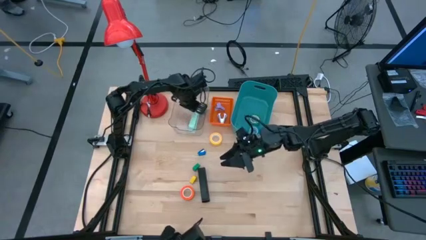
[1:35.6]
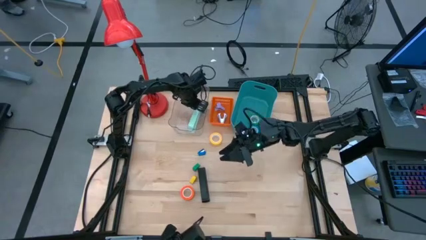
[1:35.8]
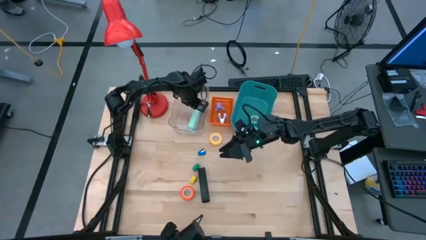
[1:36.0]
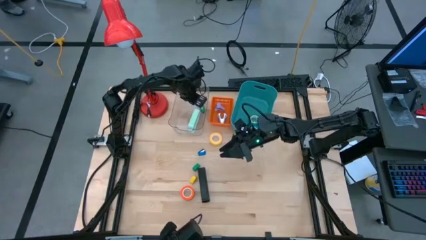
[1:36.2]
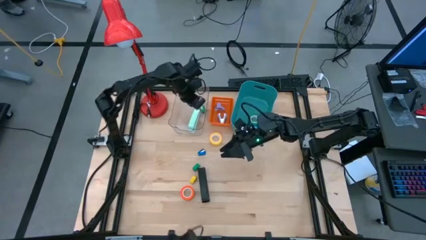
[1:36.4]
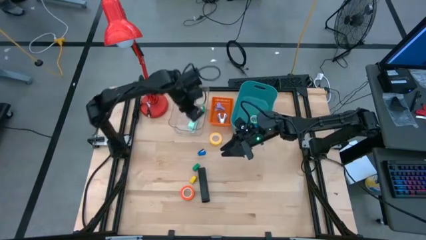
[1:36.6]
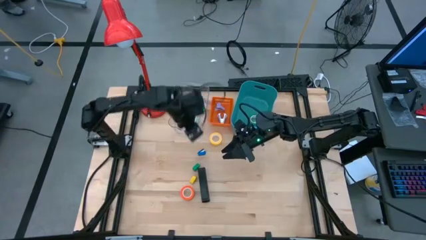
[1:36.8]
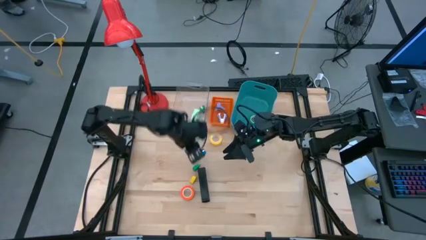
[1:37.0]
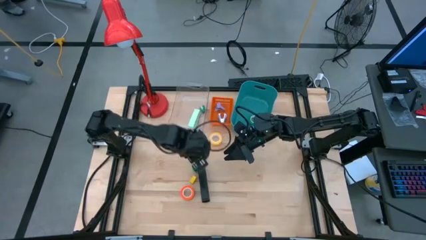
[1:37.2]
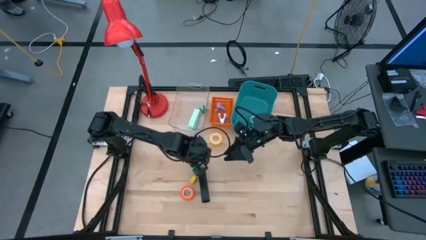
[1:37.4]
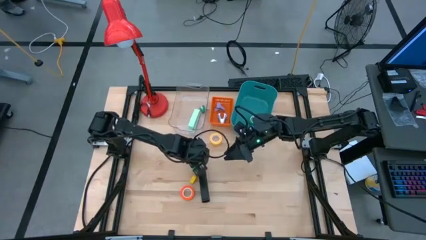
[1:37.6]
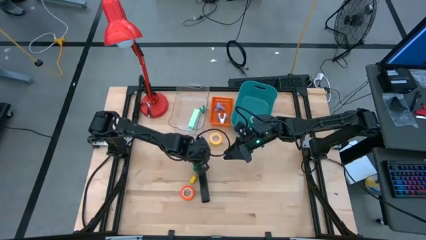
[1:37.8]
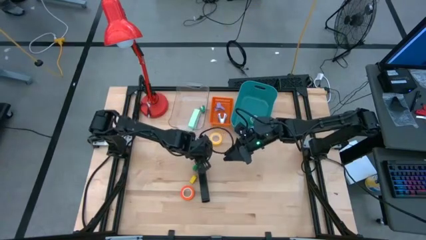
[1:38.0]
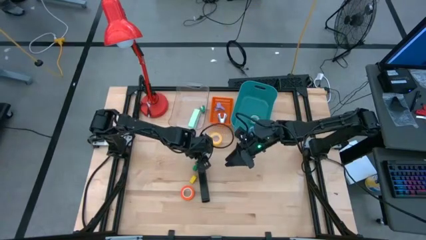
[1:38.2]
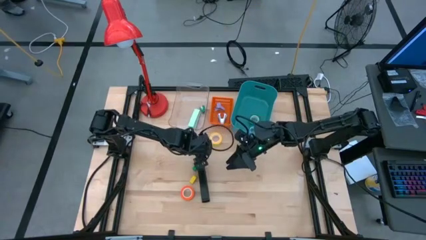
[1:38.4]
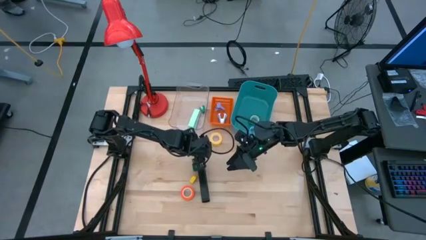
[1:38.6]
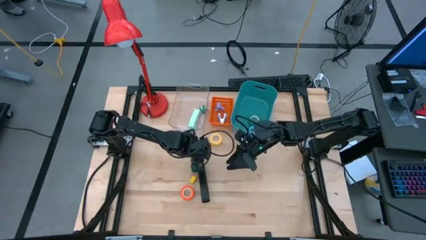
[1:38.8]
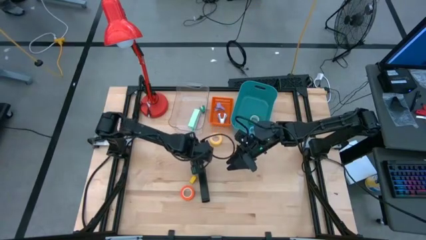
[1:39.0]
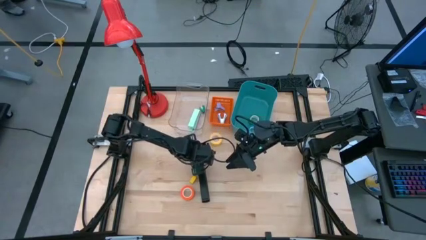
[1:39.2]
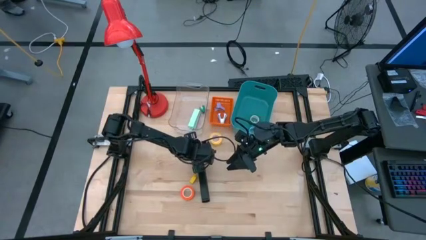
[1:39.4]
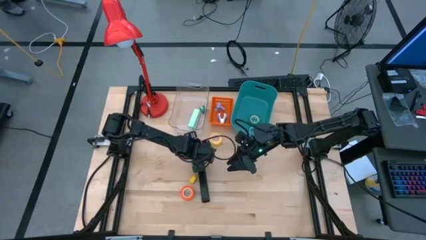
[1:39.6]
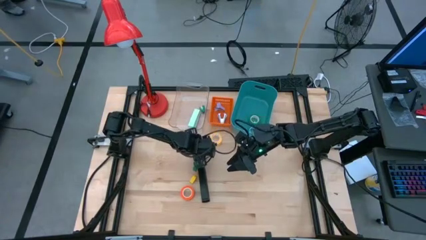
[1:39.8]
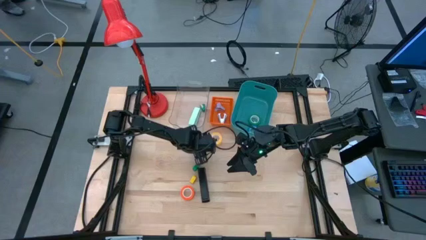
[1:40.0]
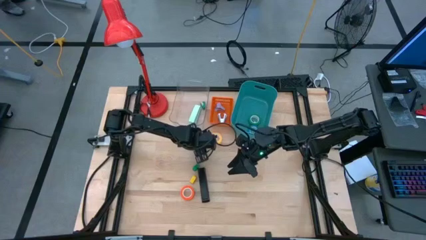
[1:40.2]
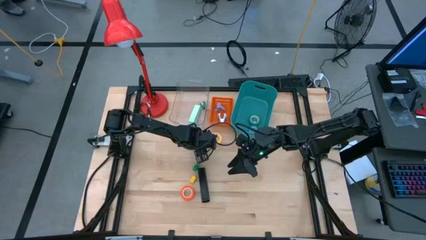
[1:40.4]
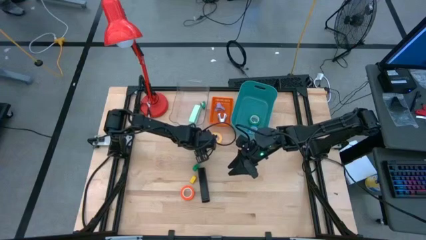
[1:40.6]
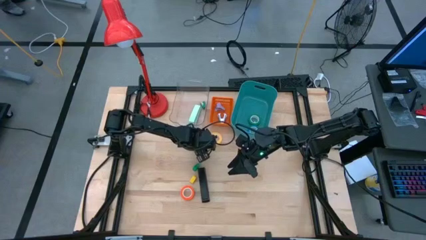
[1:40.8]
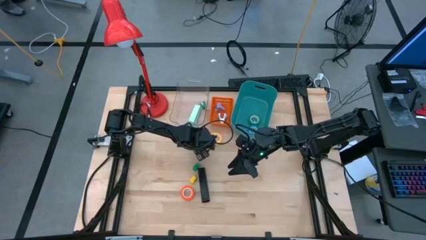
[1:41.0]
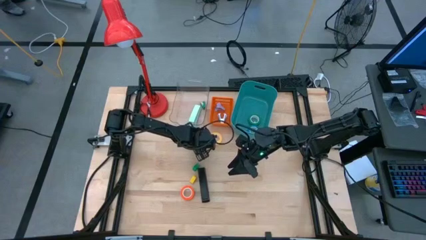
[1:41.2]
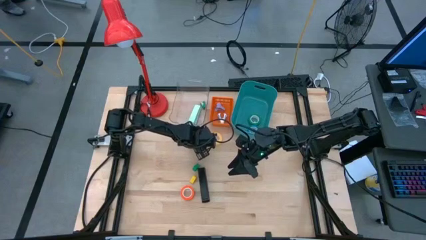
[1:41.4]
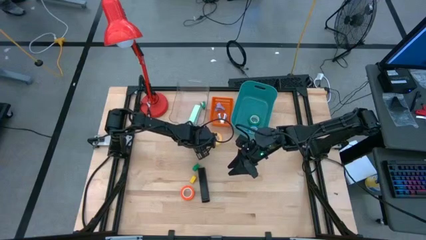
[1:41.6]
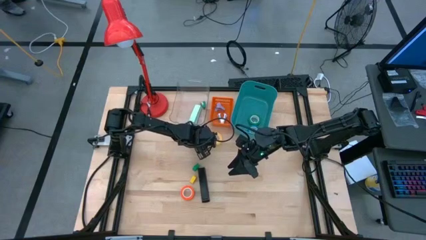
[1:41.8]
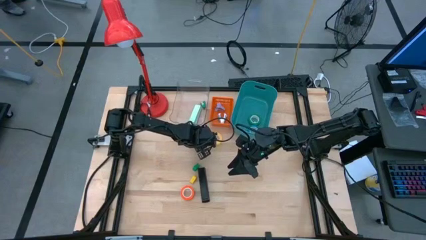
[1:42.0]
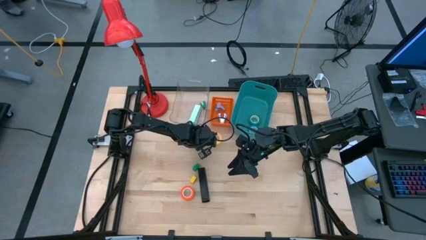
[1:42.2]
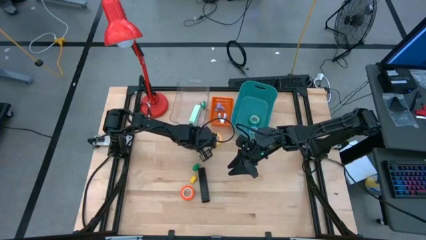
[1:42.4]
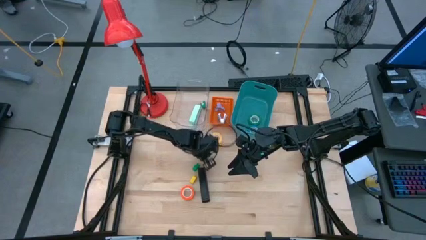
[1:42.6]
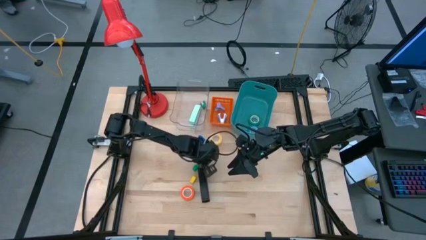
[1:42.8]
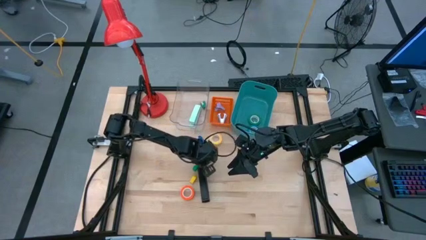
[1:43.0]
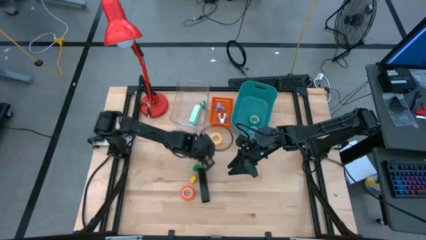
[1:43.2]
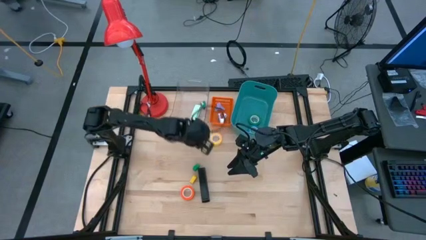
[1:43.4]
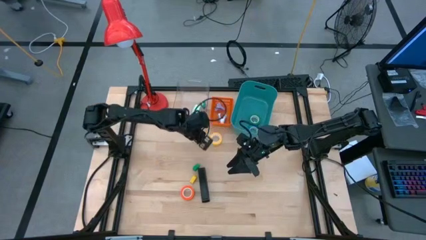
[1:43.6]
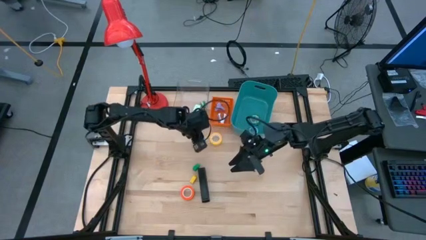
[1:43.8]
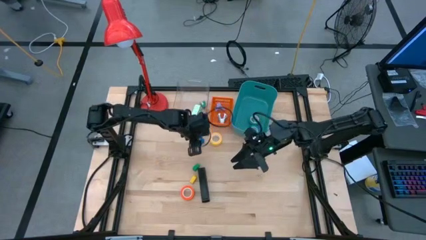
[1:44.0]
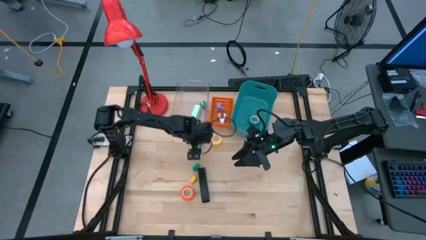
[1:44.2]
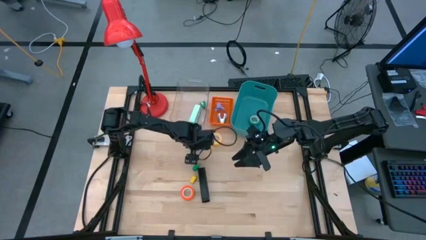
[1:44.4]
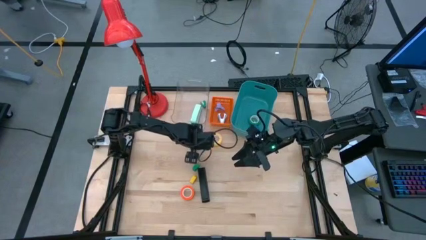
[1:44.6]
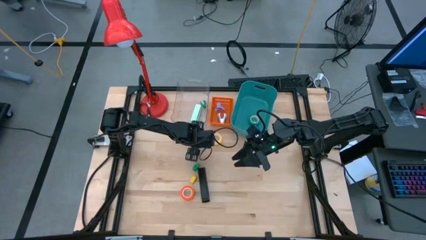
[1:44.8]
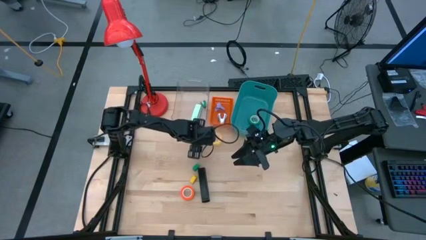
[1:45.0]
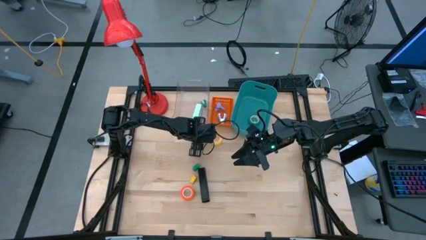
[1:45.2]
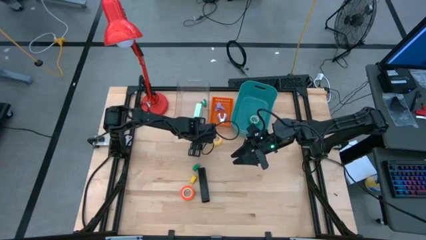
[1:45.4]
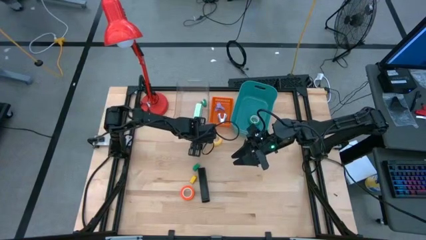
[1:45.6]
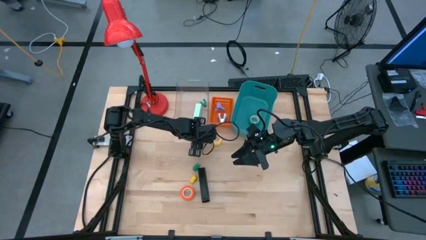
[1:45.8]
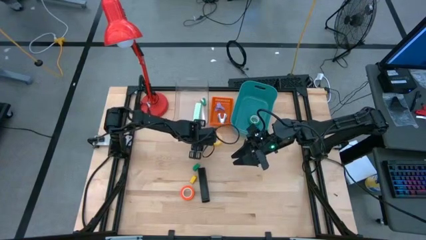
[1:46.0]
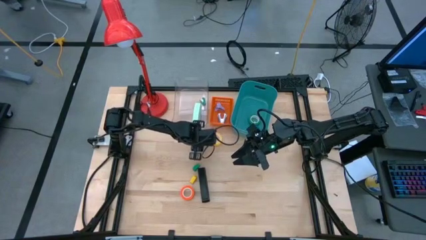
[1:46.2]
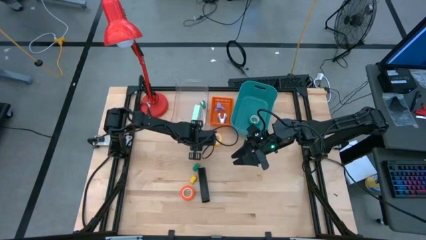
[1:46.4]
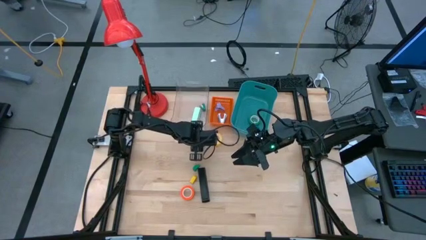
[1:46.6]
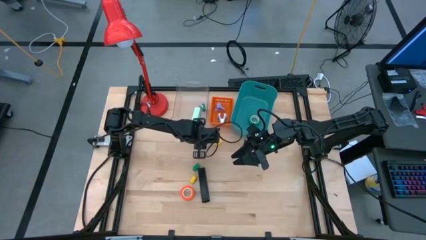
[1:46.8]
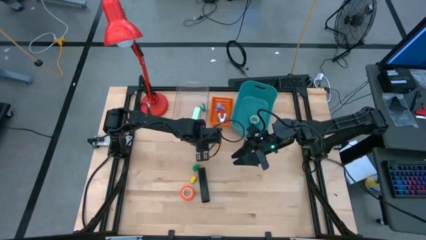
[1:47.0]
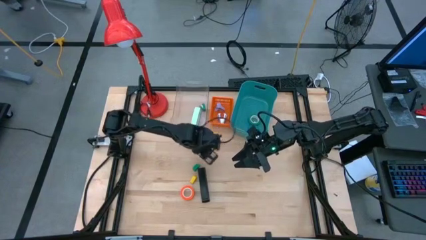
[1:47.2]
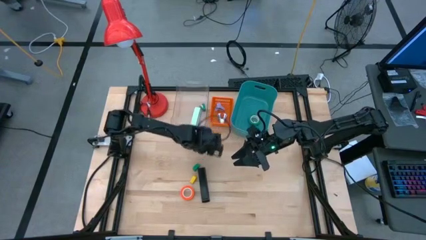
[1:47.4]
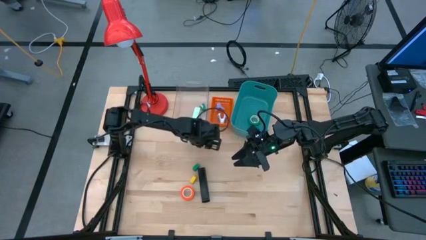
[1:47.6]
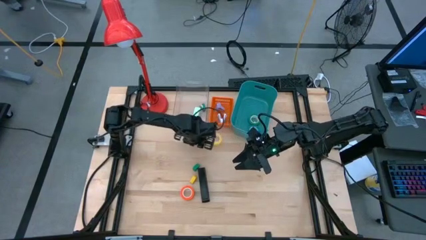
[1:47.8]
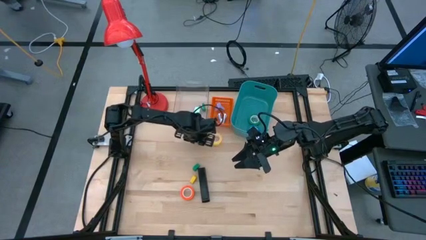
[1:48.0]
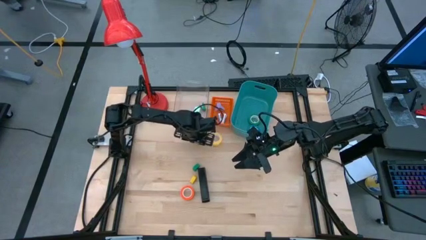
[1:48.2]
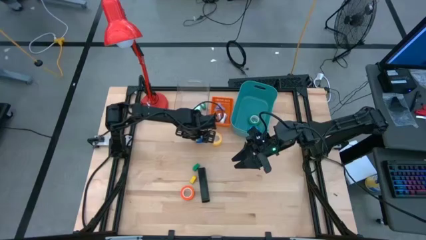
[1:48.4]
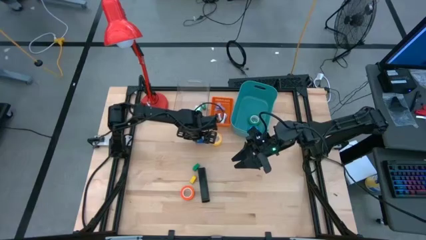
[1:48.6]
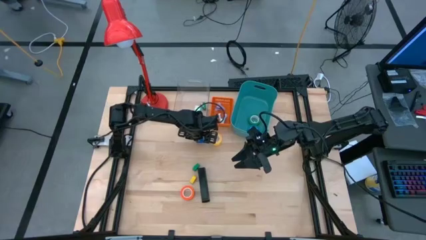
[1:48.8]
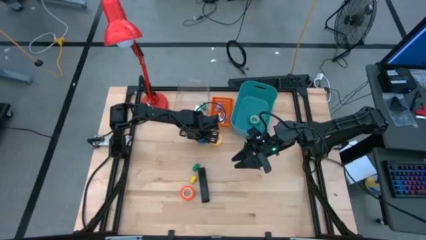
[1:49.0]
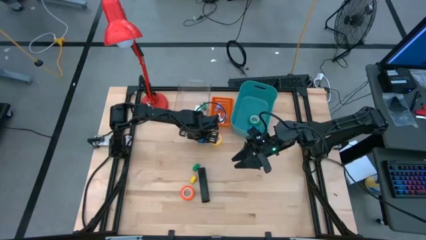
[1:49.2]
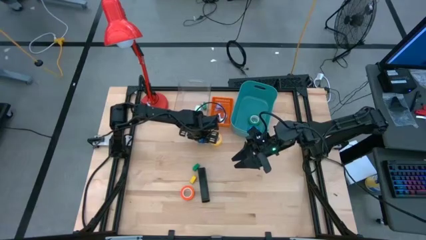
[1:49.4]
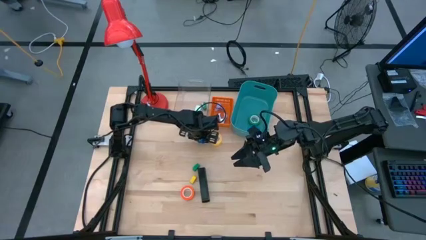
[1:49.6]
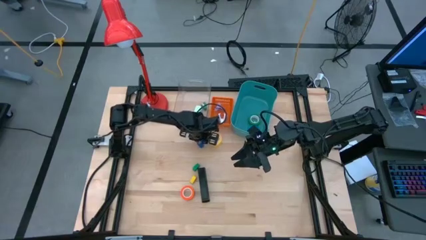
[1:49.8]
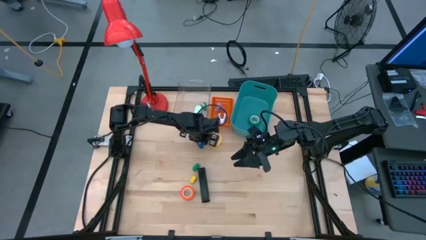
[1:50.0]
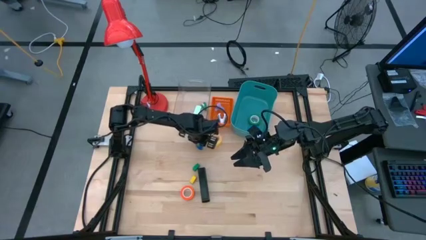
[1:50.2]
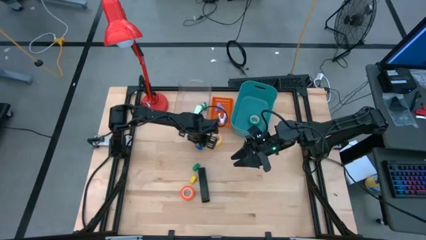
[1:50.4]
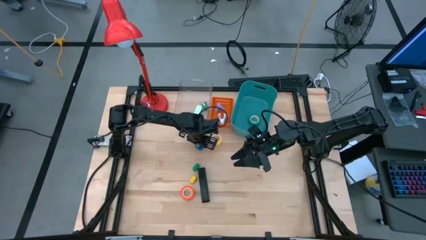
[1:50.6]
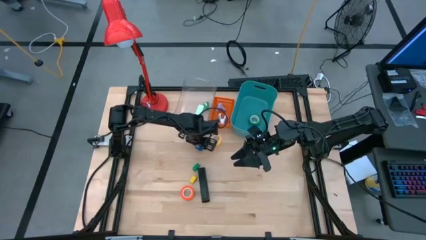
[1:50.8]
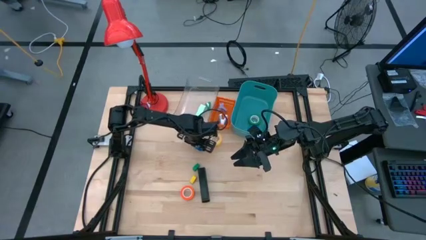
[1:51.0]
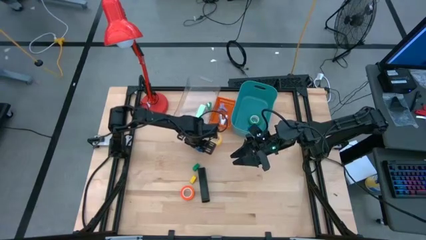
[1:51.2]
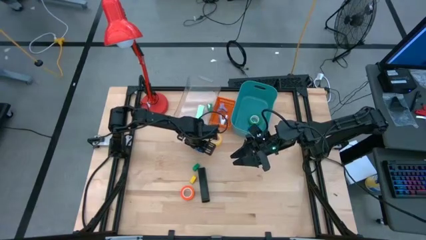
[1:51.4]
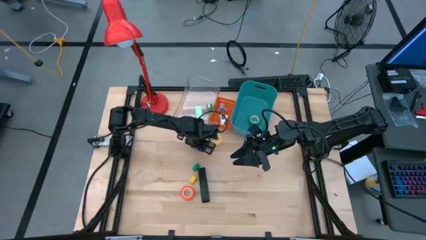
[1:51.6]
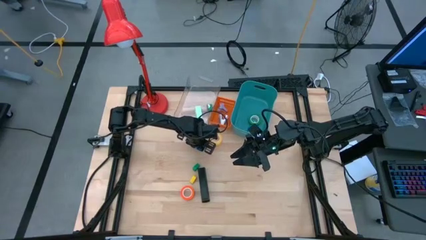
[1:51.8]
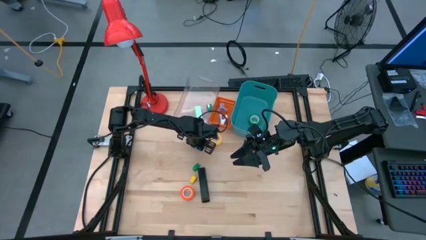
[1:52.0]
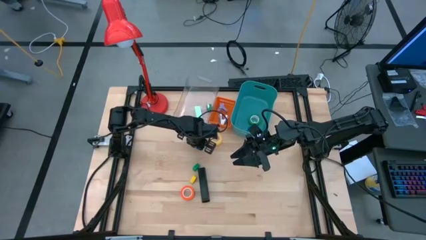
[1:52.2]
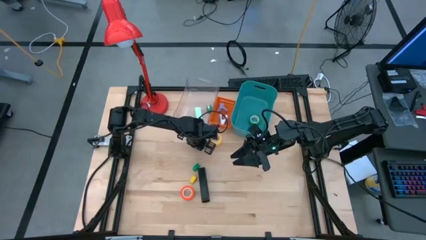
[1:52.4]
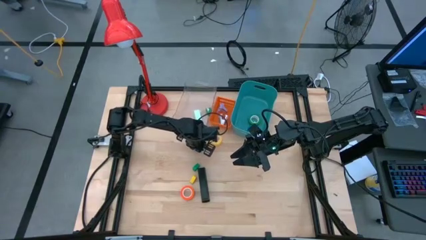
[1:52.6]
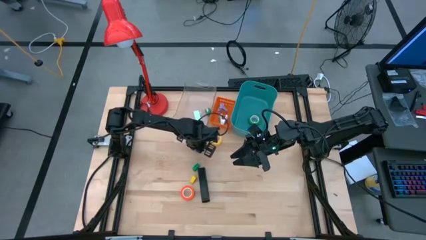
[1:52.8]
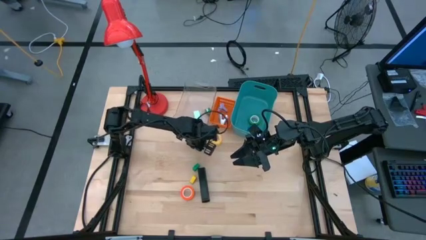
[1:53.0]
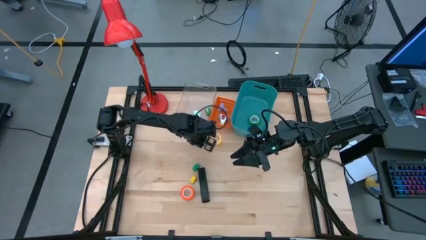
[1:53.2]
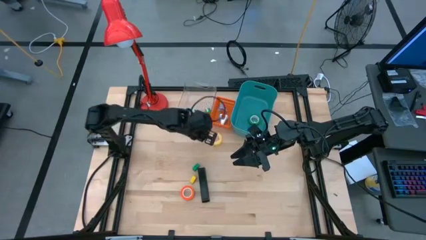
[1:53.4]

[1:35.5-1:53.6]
Task: Pick and place Stapler, Stapler remover, tape
Put the blue stapler into the transparent bin
